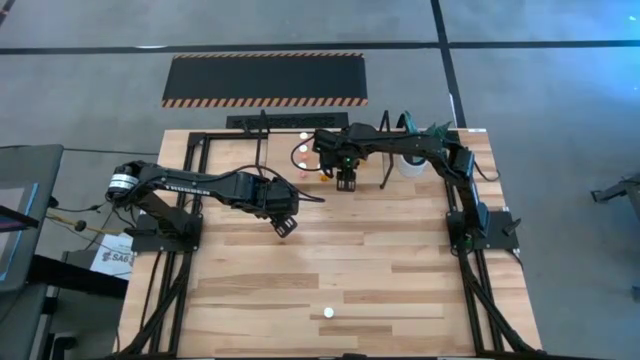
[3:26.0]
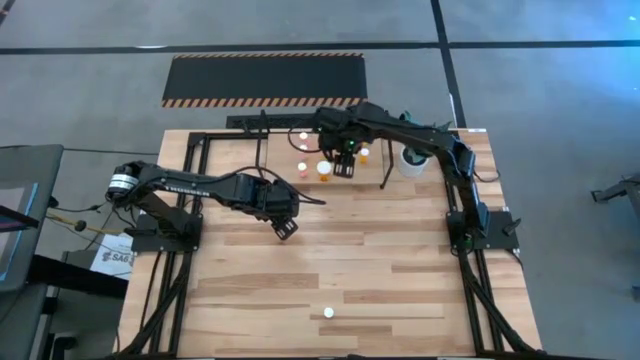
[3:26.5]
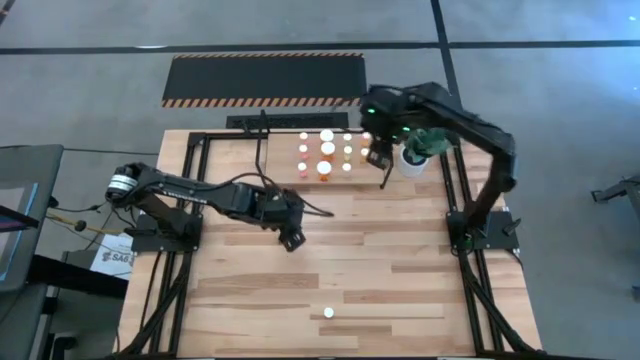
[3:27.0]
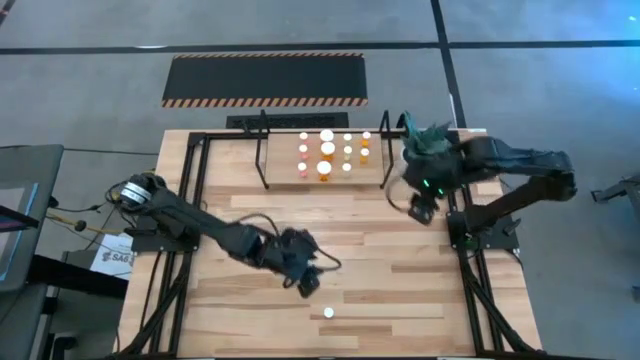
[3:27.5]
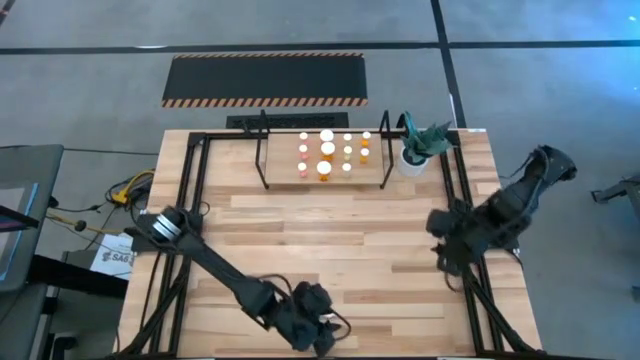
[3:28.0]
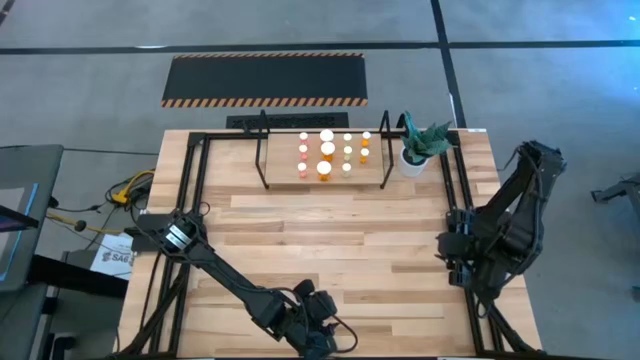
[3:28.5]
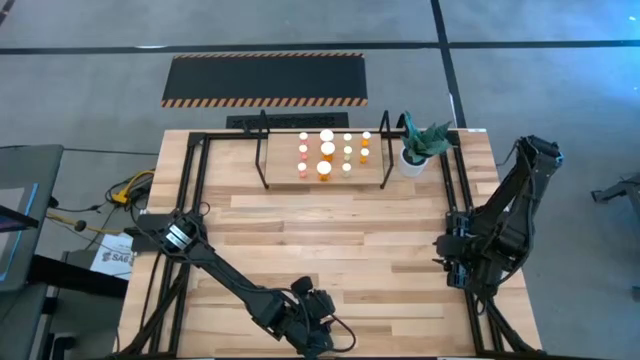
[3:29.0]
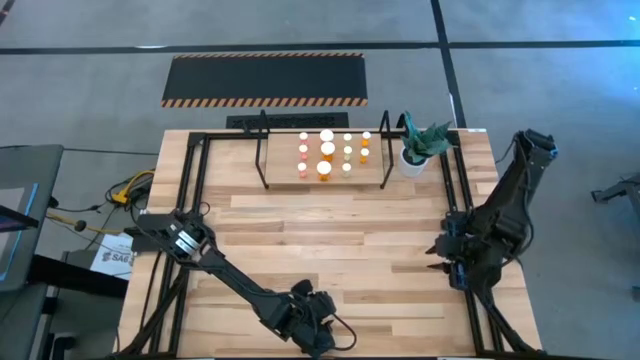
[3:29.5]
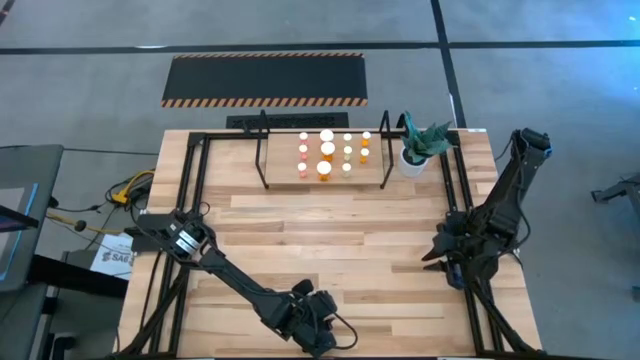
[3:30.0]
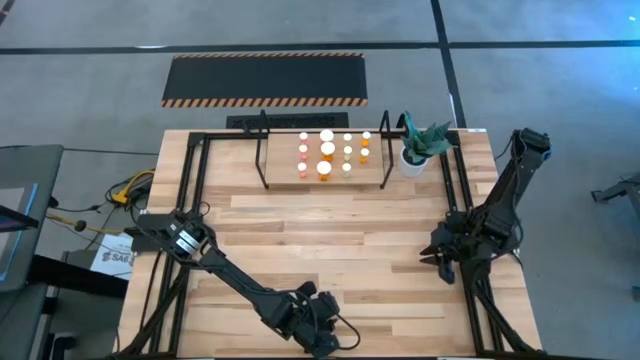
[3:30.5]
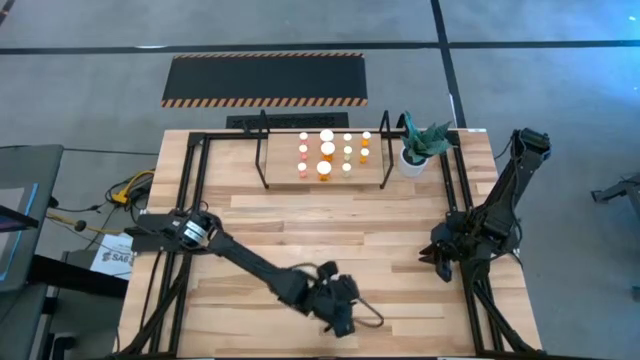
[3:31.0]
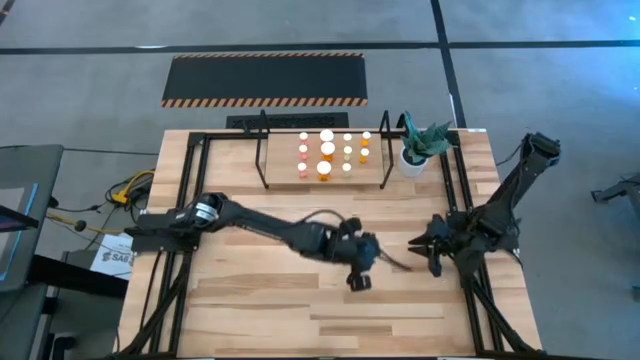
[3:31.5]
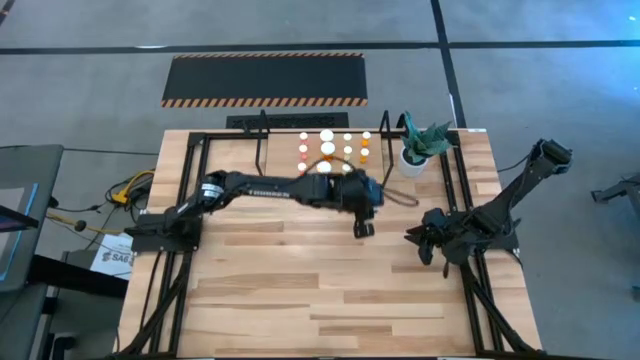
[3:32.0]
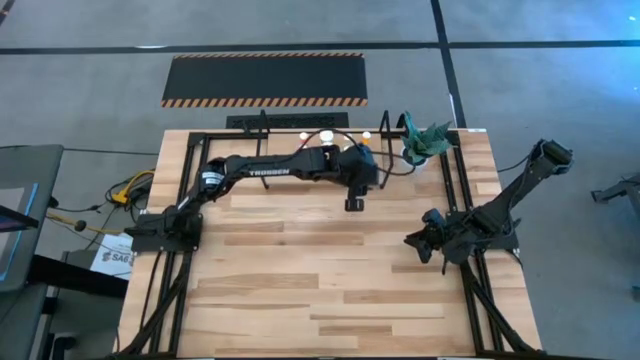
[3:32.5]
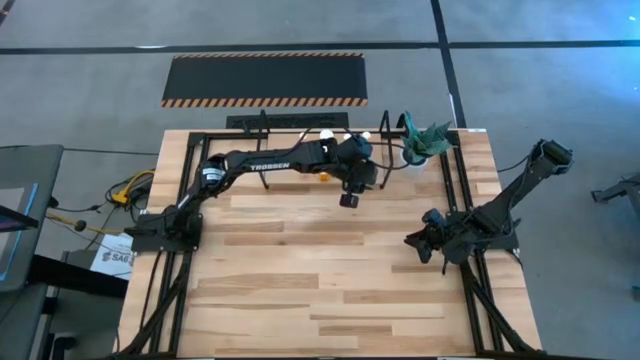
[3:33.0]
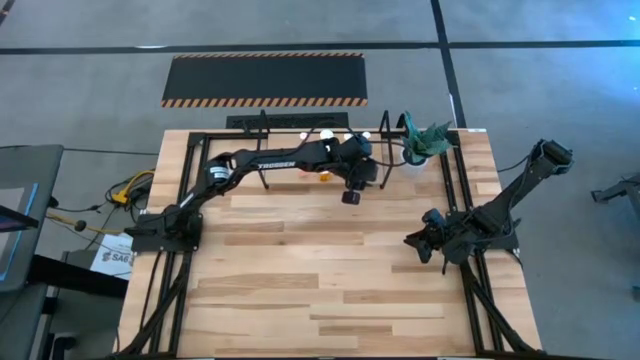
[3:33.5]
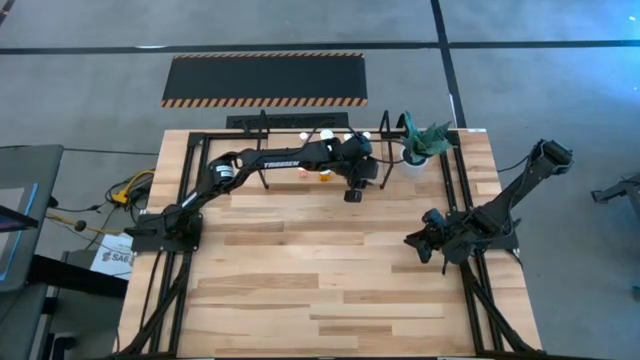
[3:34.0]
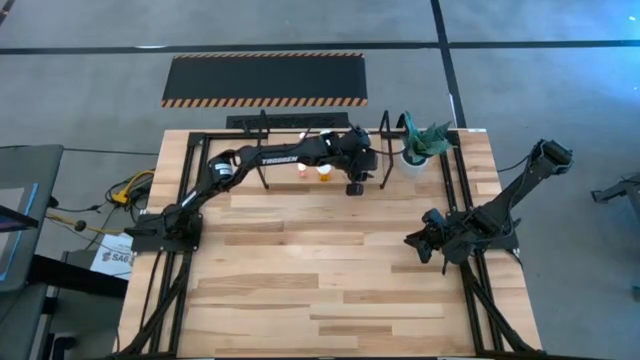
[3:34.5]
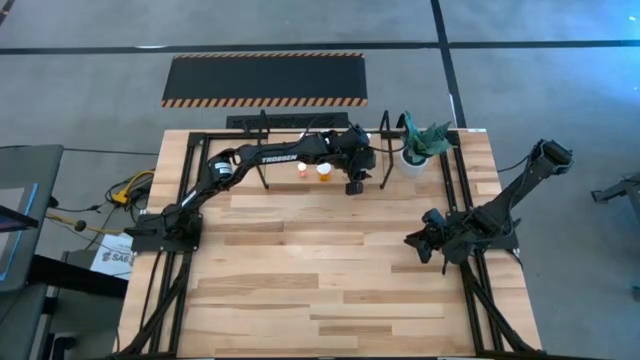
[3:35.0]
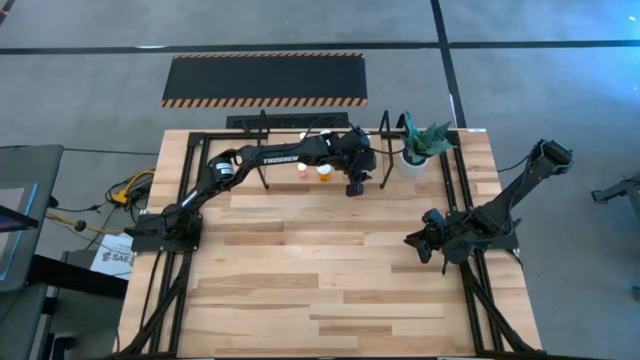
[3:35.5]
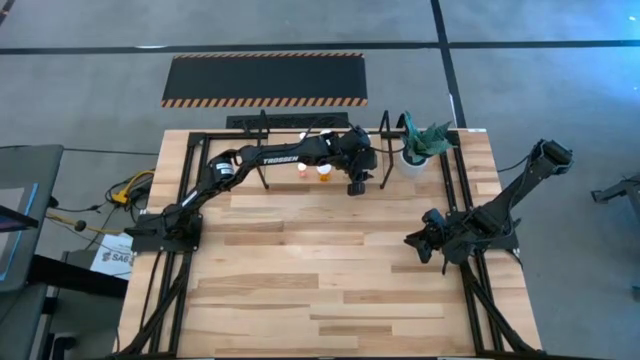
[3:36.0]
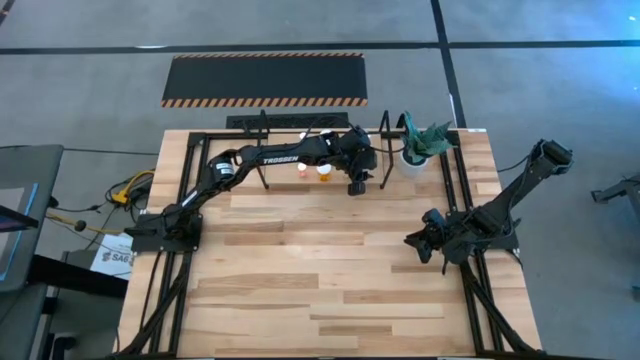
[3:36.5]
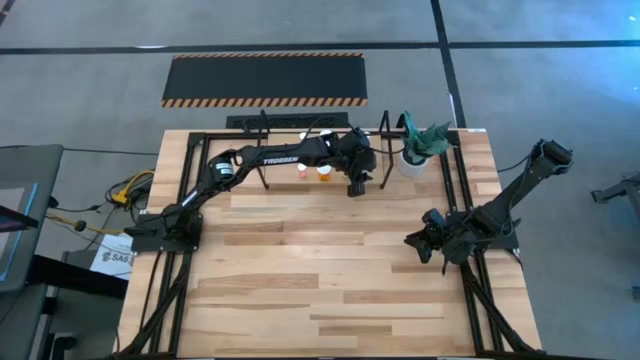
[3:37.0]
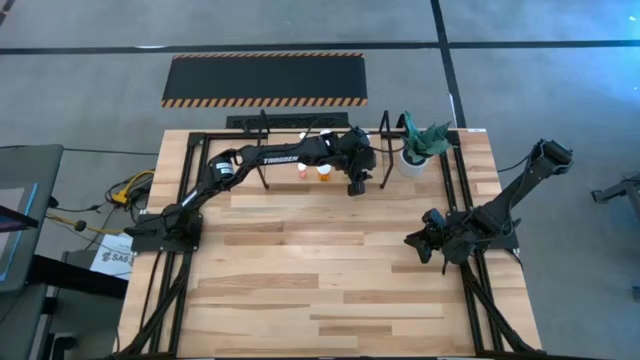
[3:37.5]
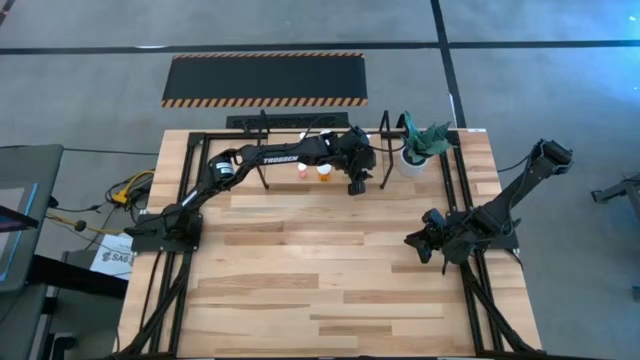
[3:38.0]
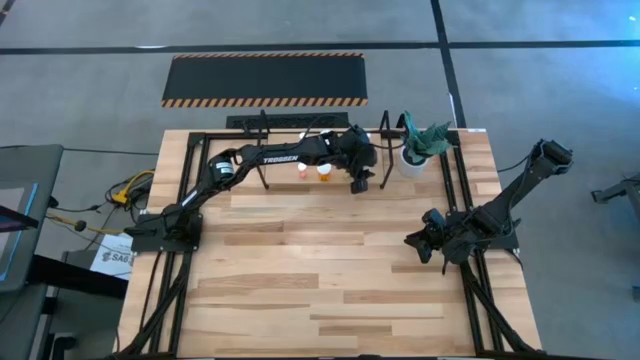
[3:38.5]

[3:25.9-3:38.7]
Task: Pick and place medicine bottles onto shelf by color
Put the small orange pill bottle on the shelf aligned with the other small orange pill bottles

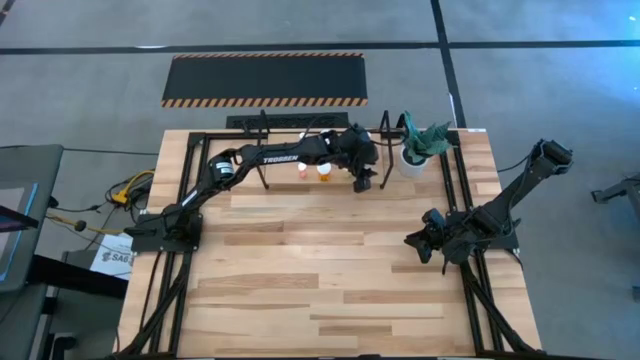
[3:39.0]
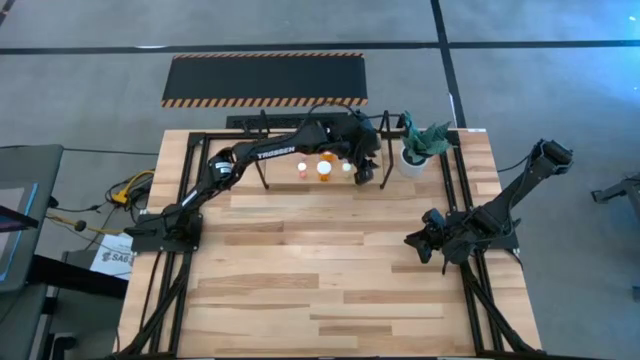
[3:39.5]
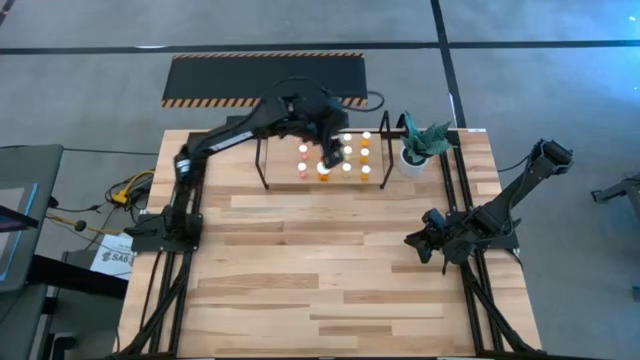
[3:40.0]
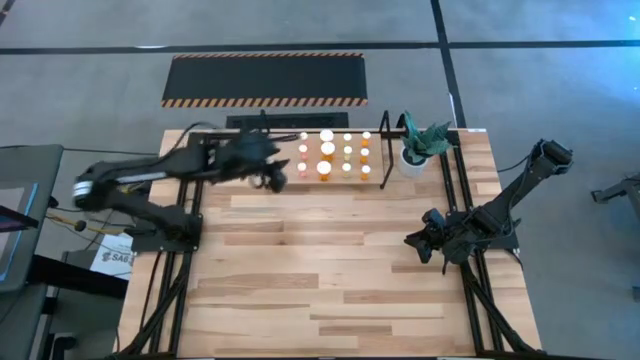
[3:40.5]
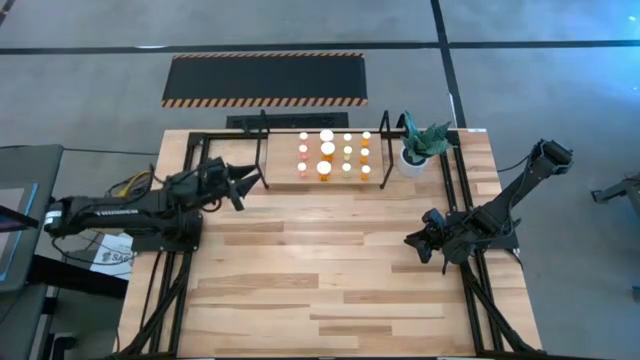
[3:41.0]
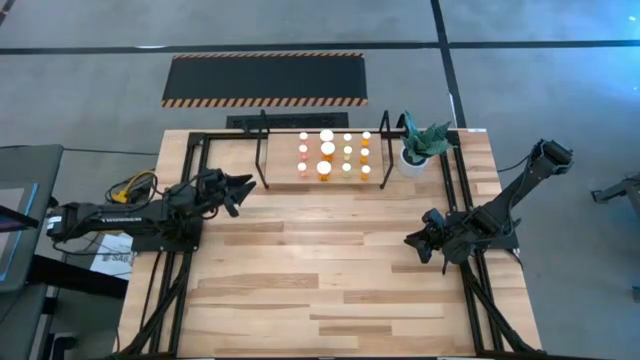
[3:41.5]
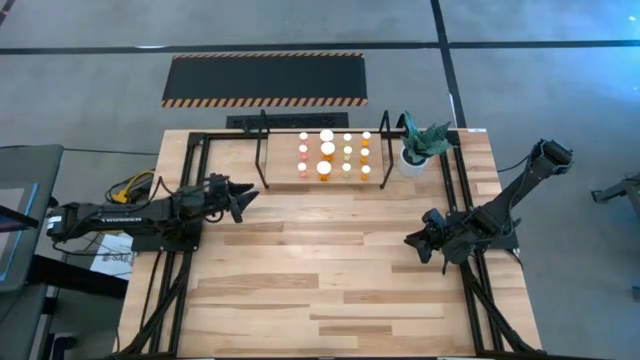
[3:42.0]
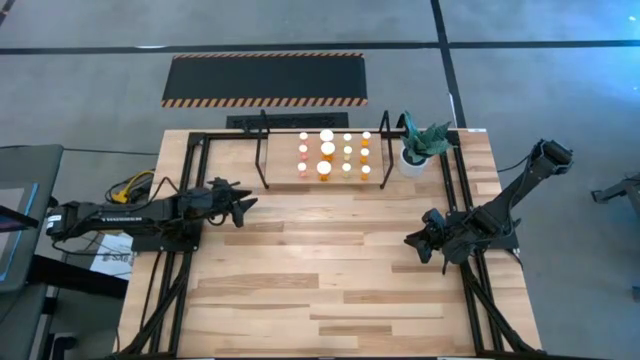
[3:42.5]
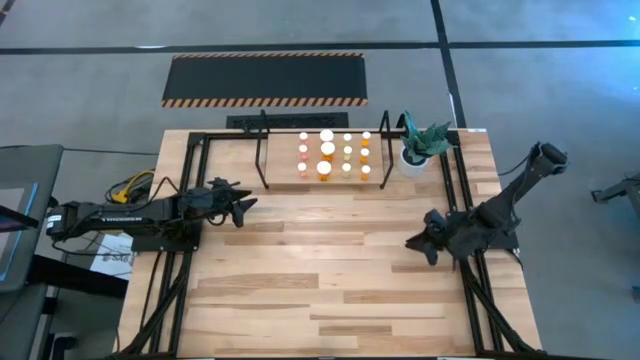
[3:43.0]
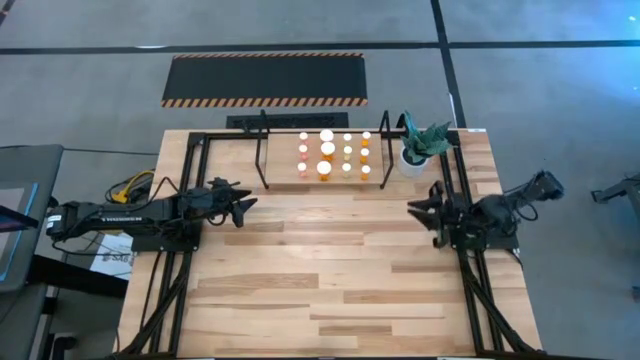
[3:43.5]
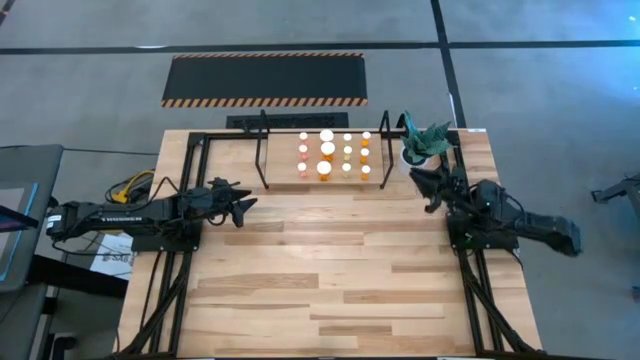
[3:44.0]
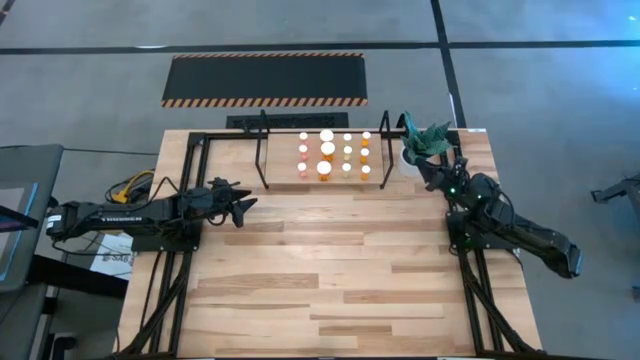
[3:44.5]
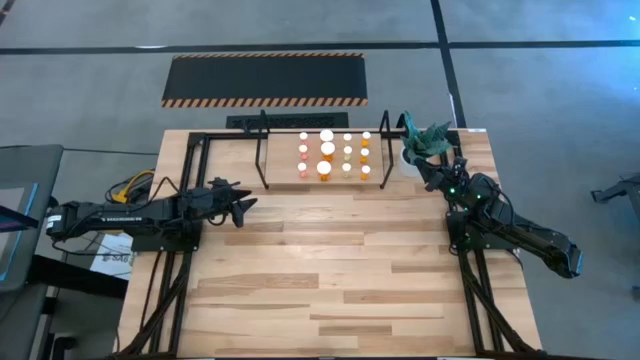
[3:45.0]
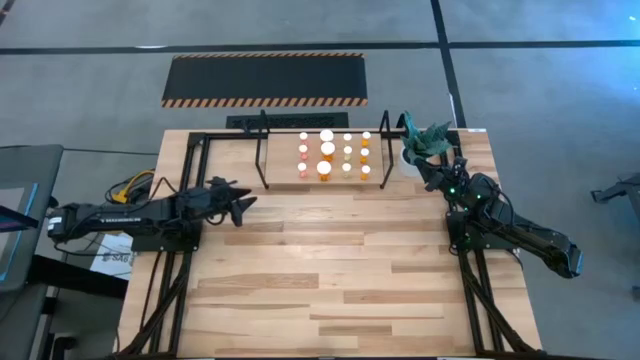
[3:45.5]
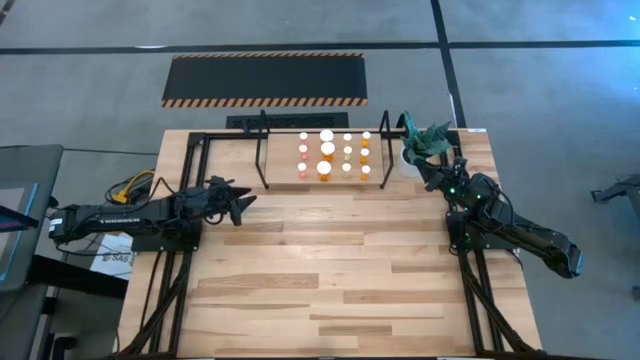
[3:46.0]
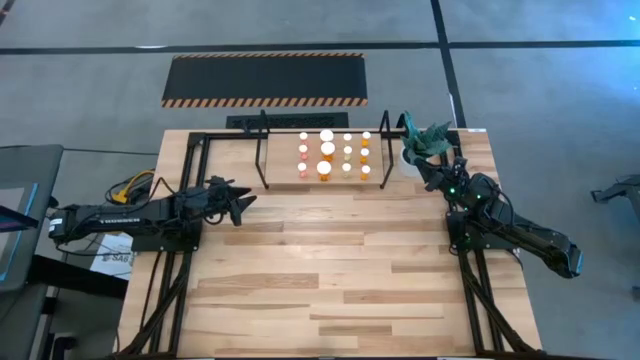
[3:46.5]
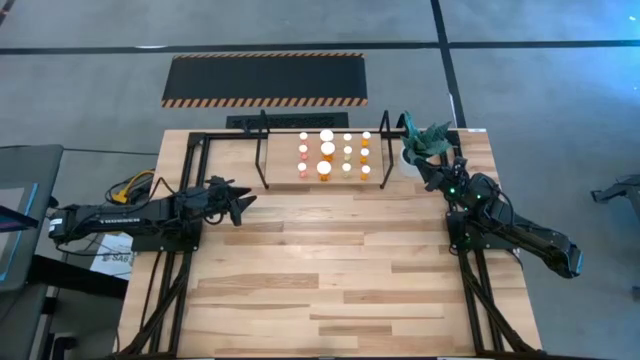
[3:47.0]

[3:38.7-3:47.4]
Return to Home Position
